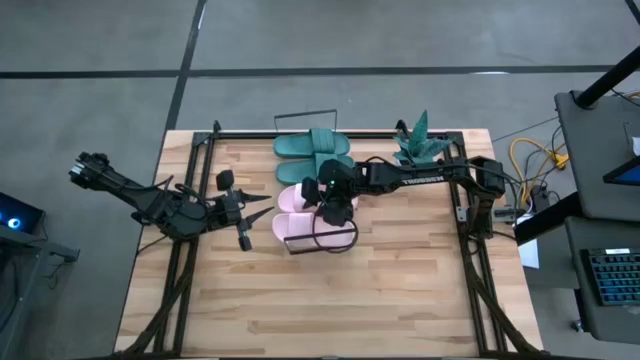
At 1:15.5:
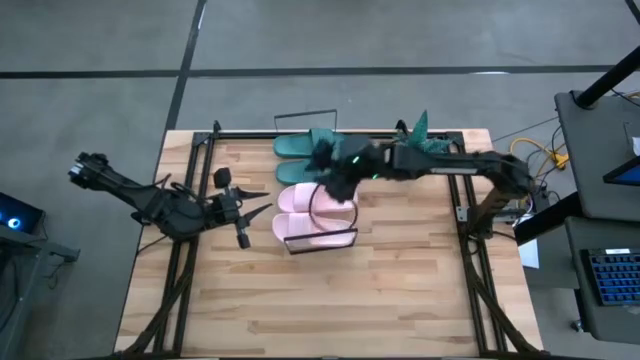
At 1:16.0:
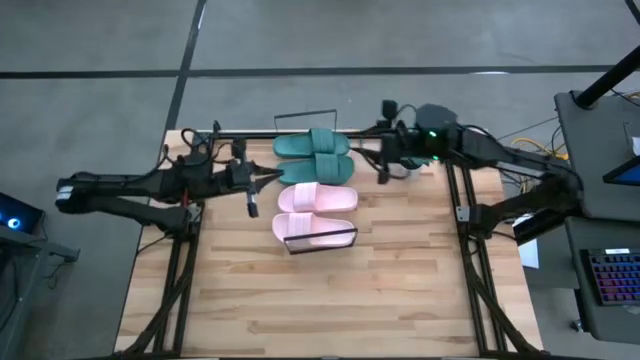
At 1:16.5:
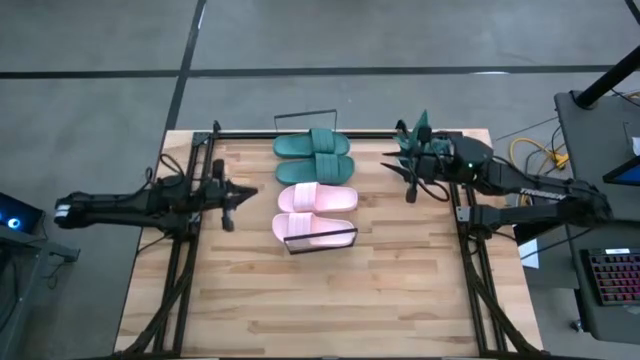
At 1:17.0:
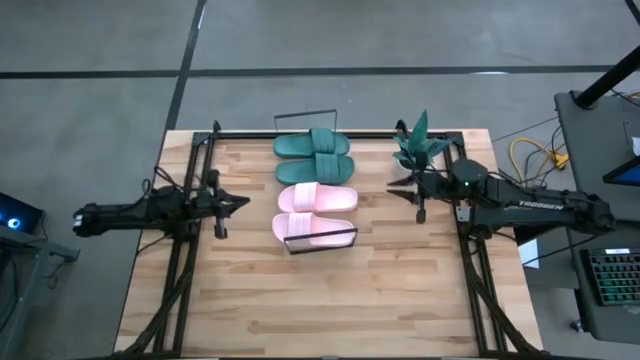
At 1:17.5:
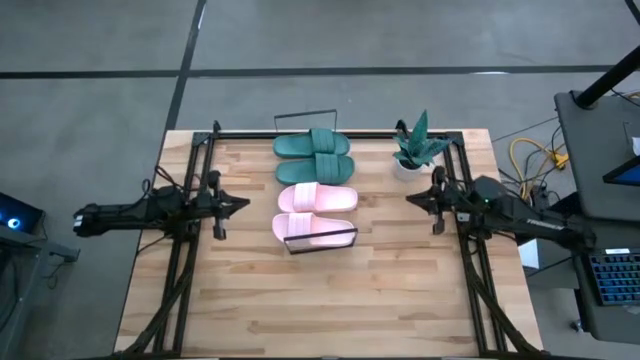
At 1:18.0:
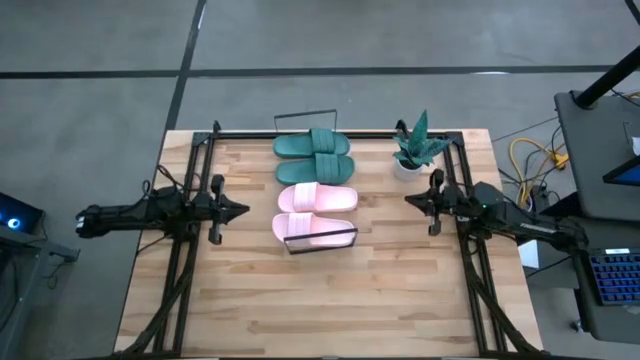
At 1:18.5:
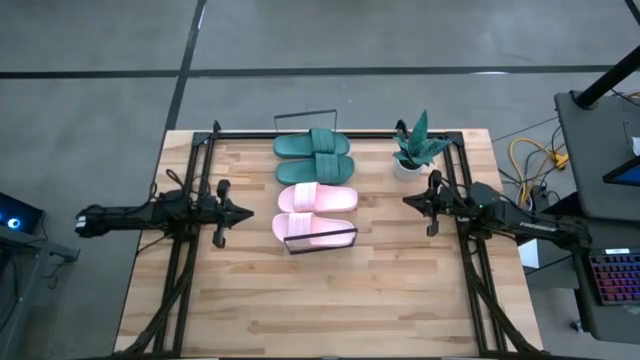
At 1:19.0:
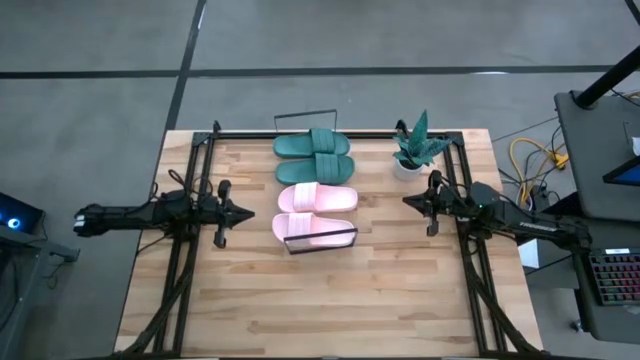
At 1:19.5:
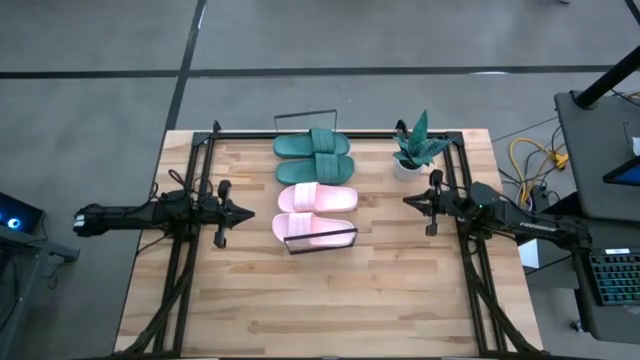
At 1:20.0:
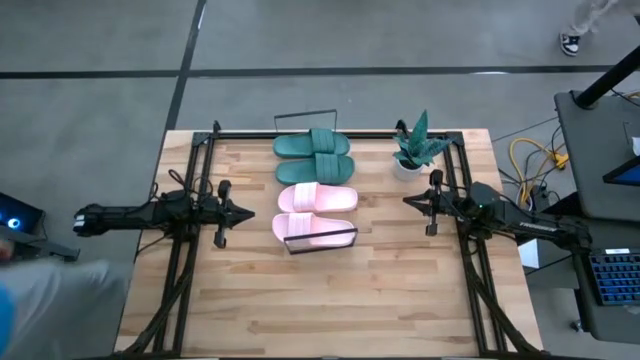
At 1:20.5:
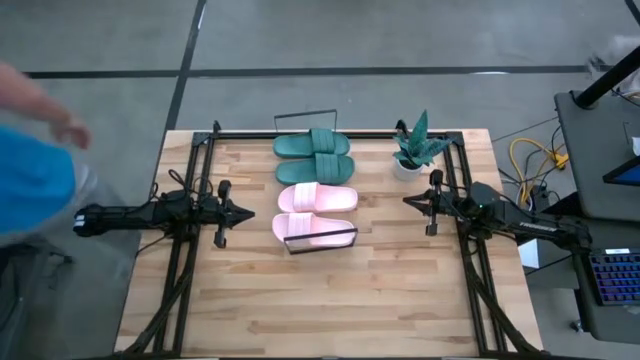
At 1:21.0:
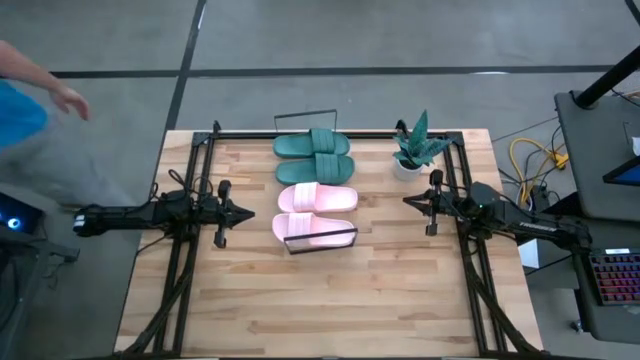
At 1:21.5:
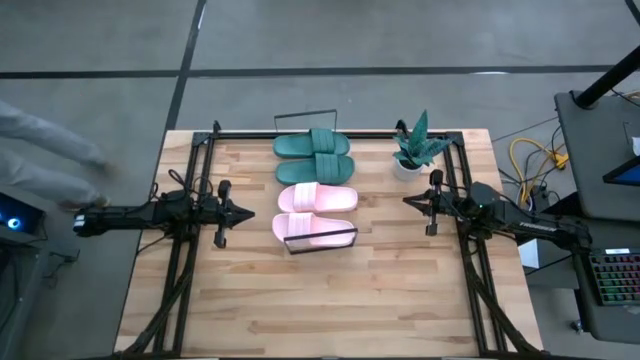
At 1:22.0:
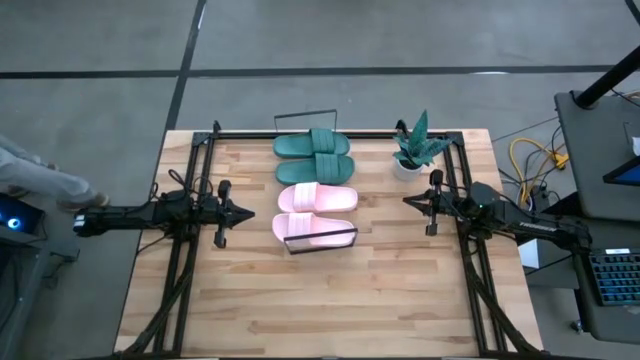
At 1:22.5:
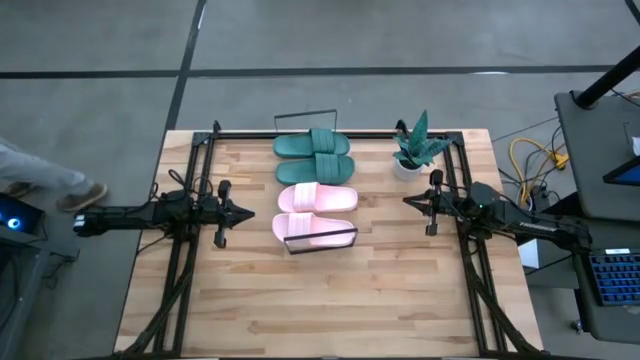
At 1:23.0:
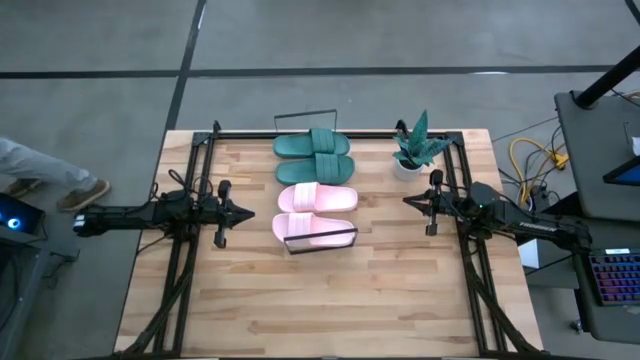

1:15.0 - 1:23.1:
Task: Pick and place slides into the shelf
Return to Home Position

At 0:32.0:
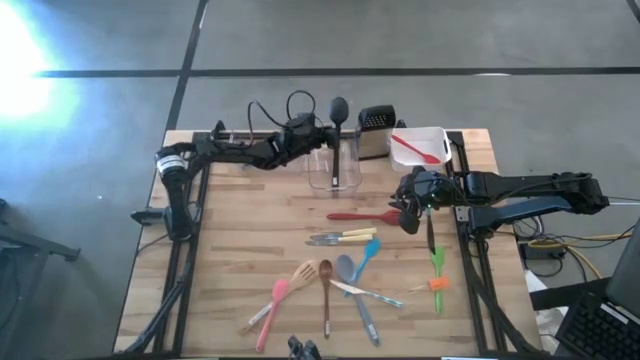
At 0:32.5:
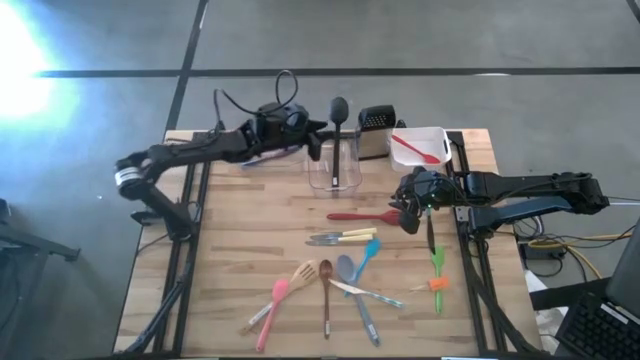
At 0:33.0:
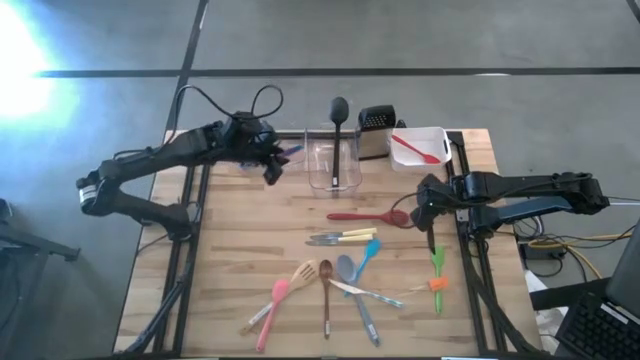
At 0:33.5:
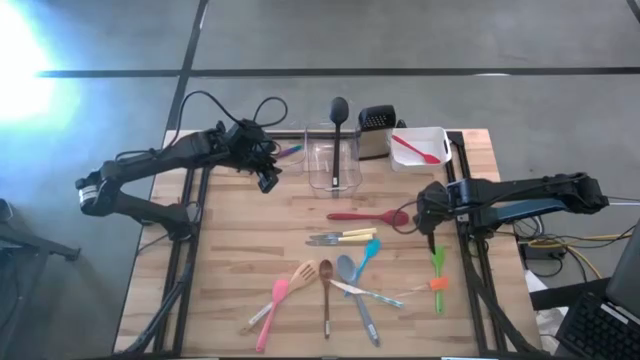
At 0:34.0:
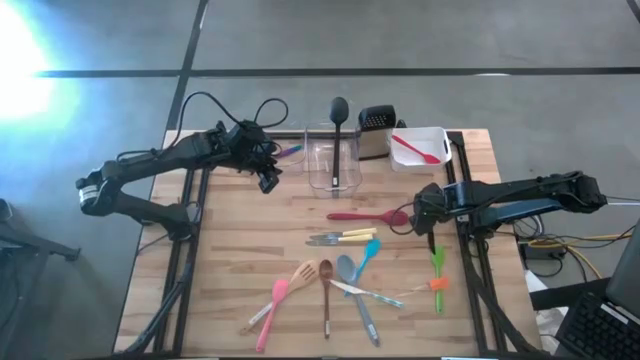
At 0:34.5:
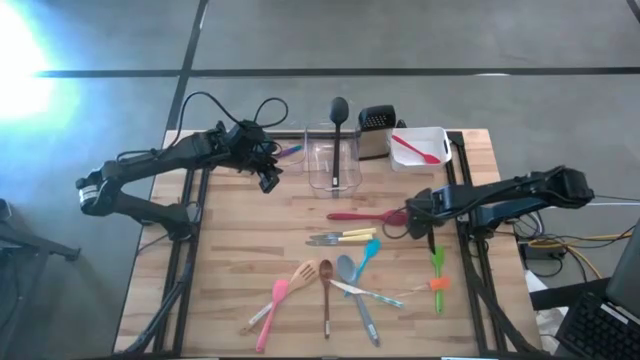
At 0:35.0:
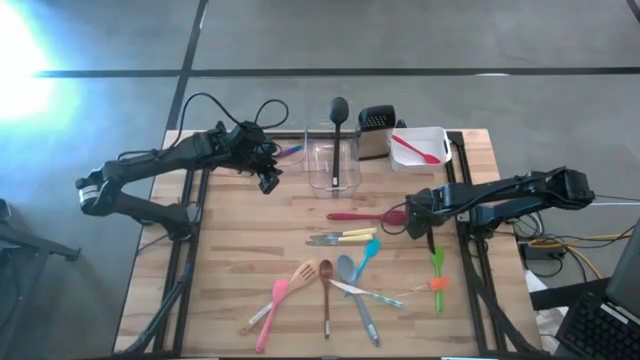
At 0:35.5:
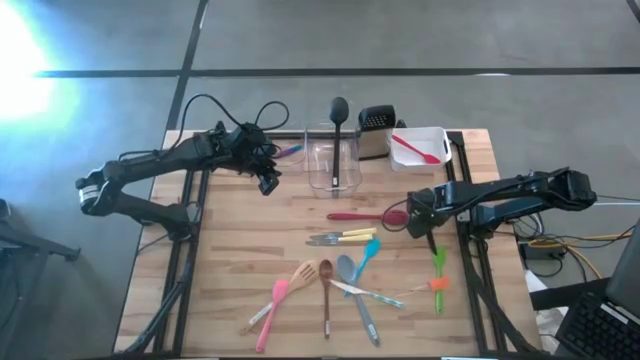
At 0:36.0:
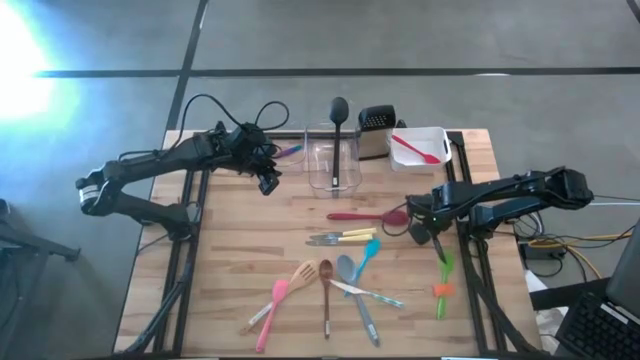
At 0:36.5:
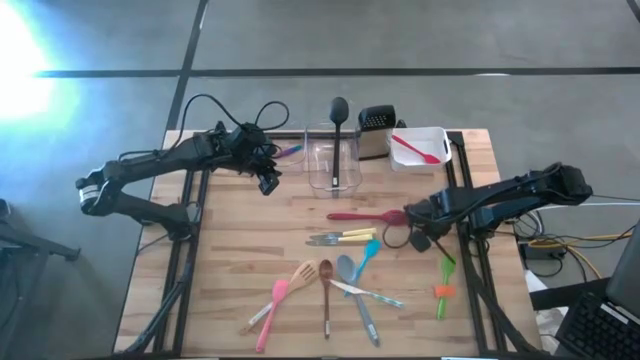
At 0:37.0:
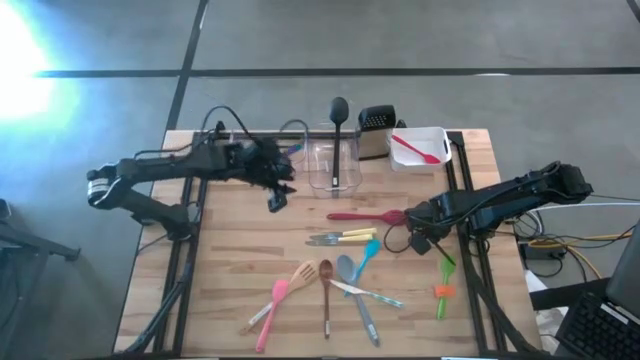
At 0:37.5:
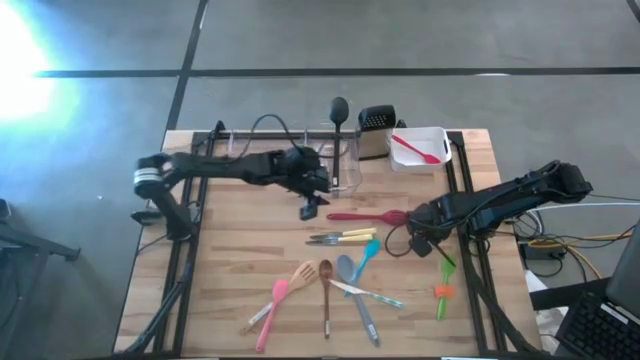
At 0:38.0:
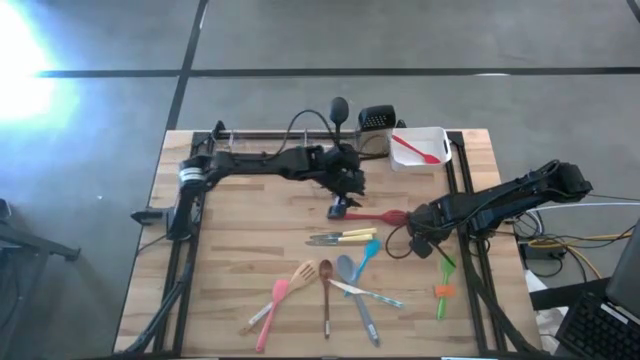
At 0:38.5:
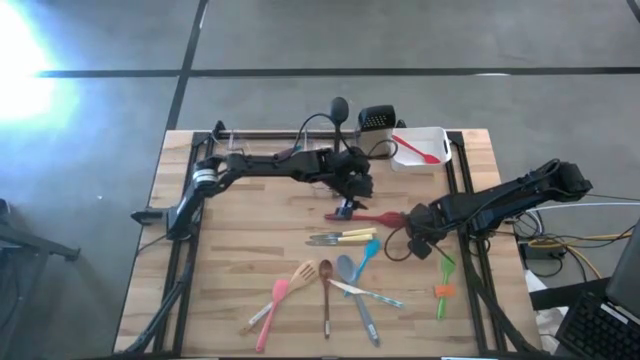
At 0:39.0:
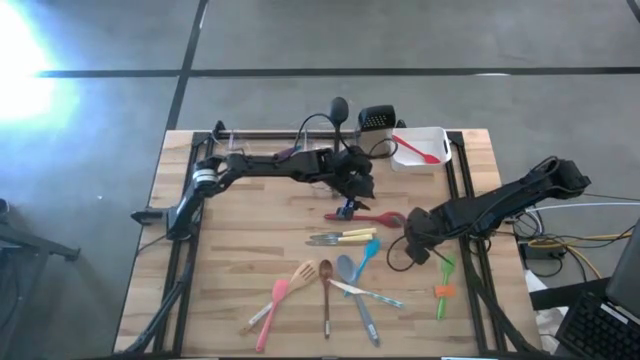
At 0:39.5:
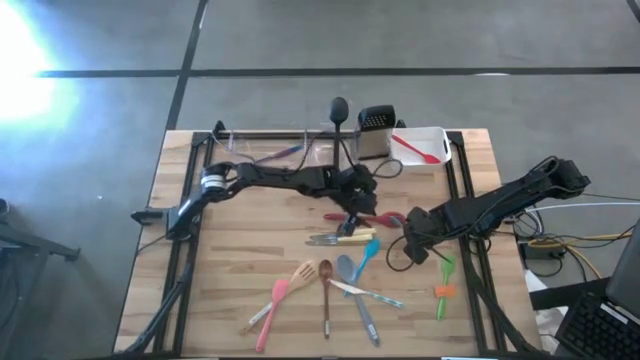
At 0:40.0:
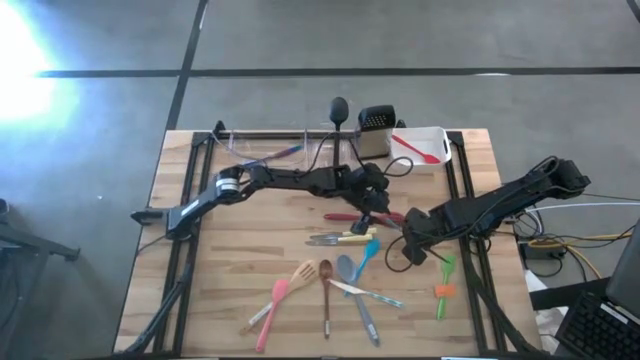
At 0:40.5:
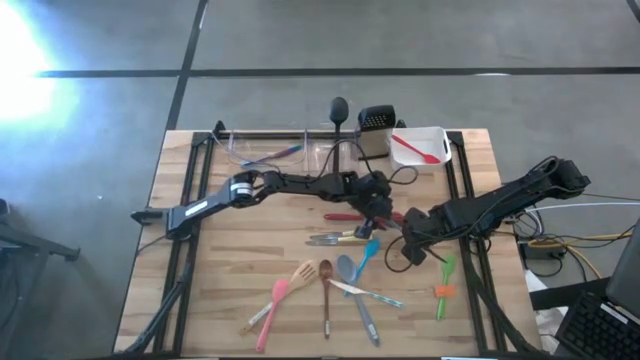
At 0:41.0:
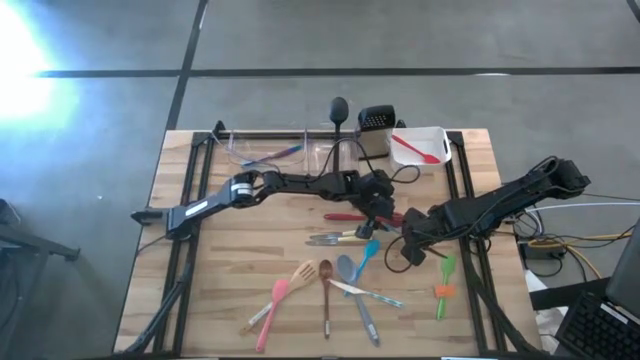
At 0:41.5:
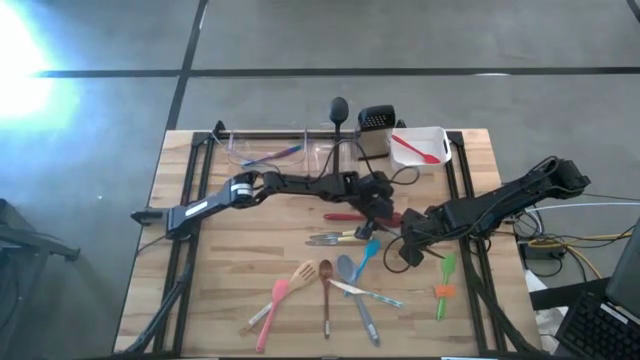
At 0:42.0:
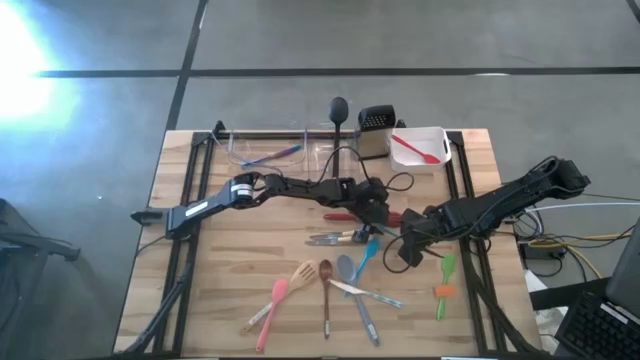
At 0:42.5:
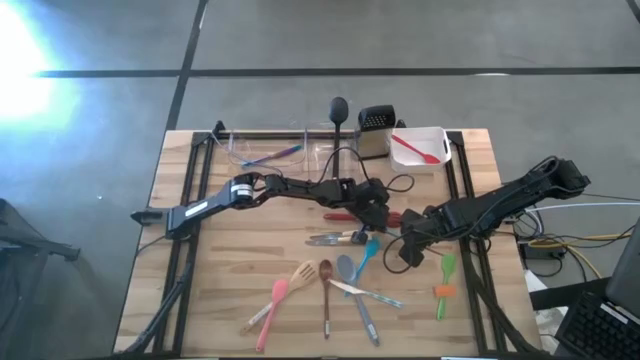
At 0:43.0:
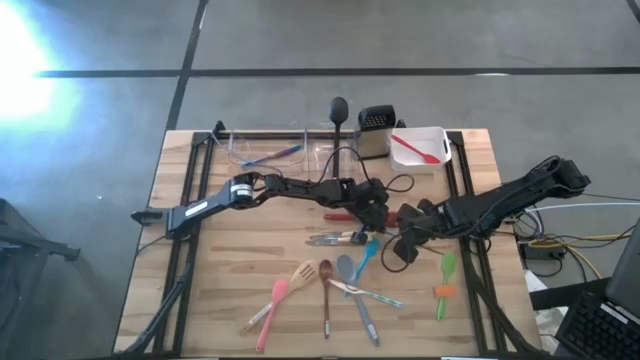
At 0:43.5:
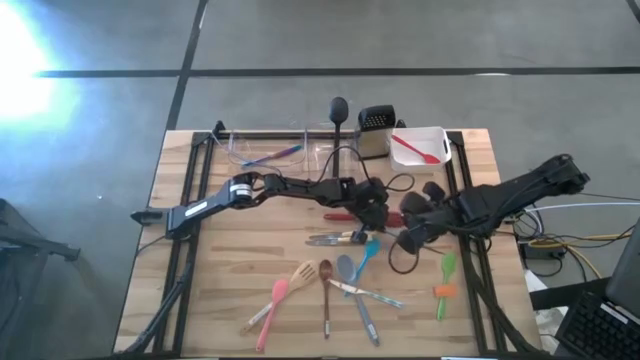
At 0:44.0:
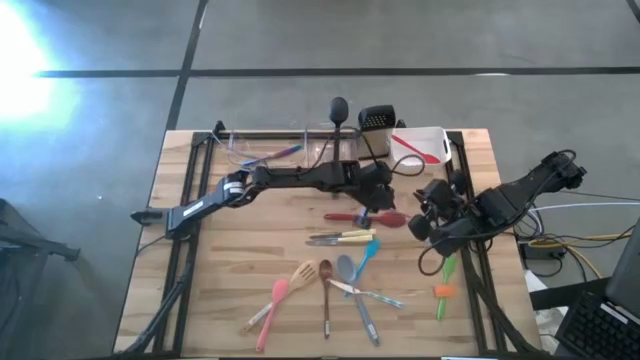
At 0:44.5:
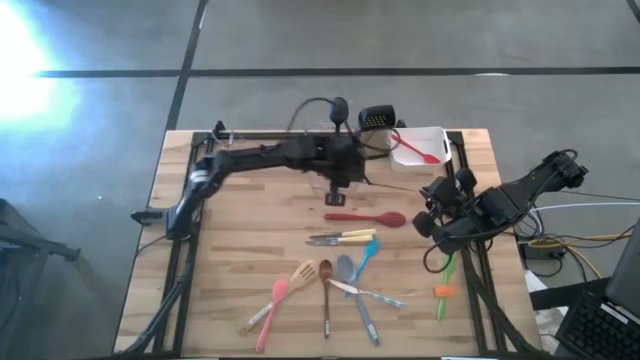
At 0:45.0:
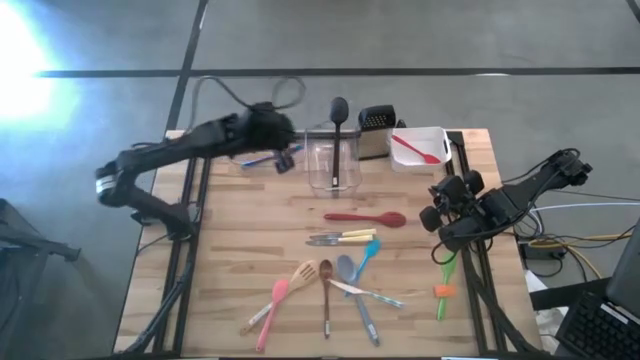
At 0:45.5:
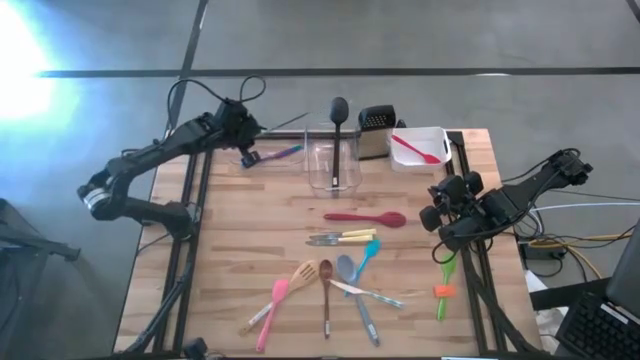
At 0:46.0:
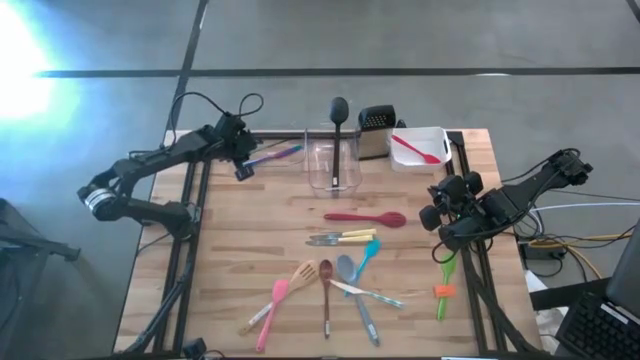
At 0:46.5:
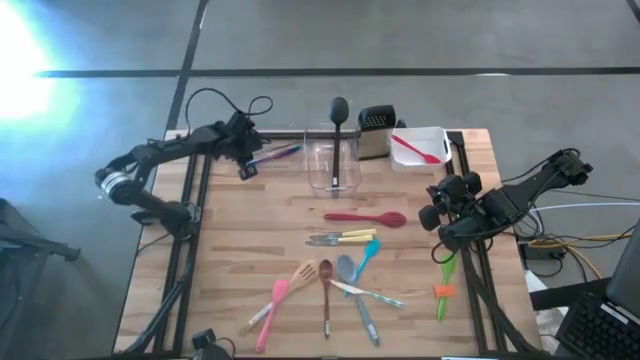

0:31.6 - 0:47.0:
Task: Pick & Place Kitchen Items
Put the blue knife into the left transparent bin
